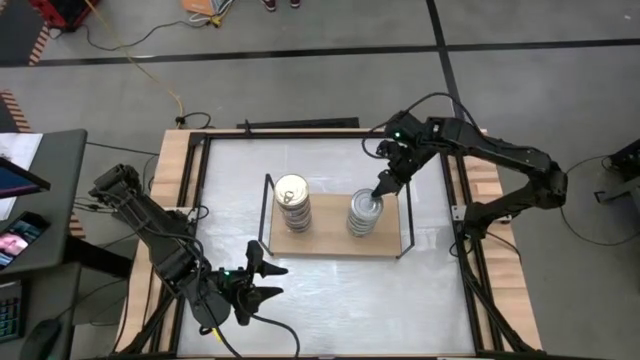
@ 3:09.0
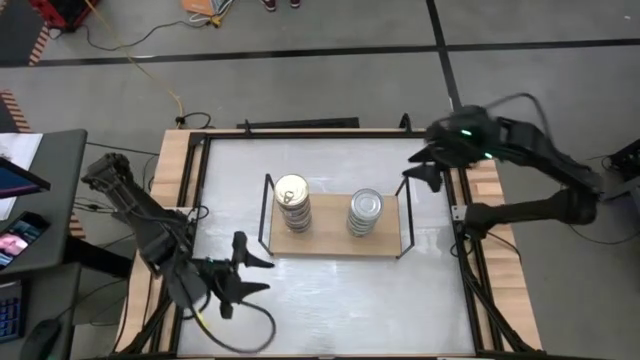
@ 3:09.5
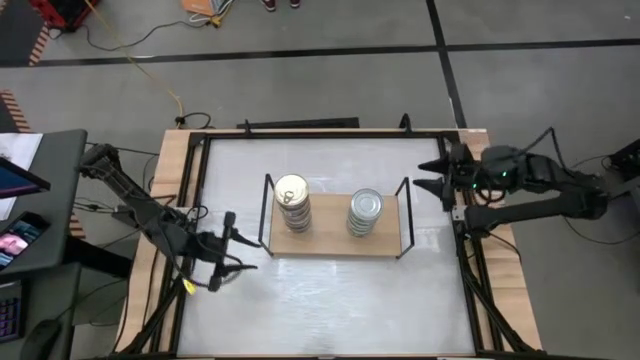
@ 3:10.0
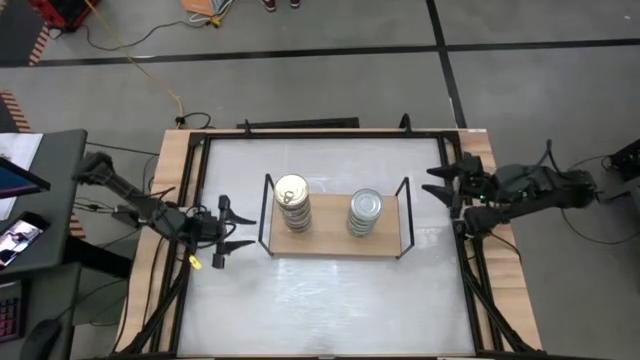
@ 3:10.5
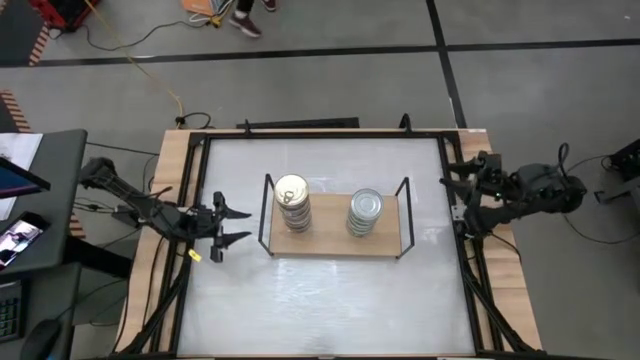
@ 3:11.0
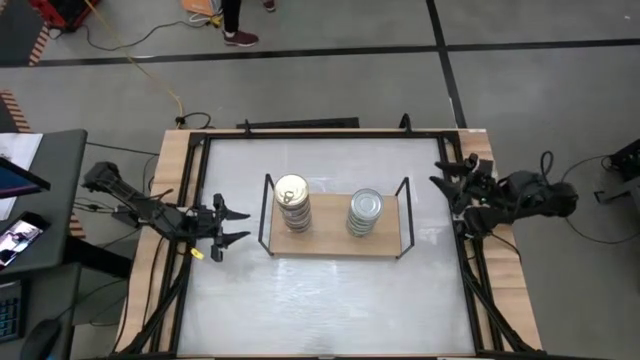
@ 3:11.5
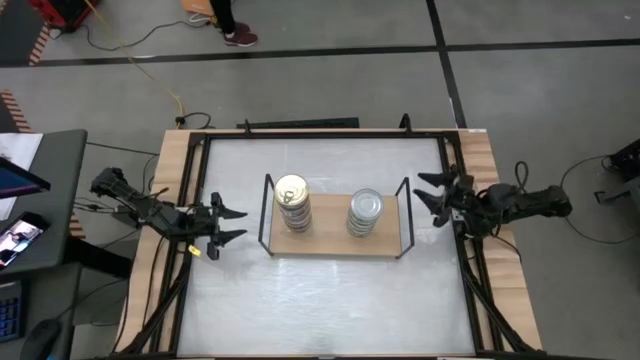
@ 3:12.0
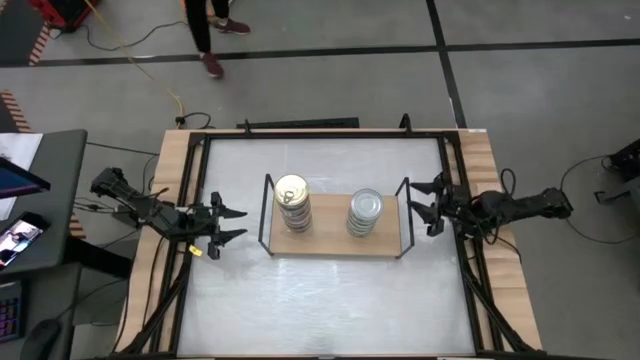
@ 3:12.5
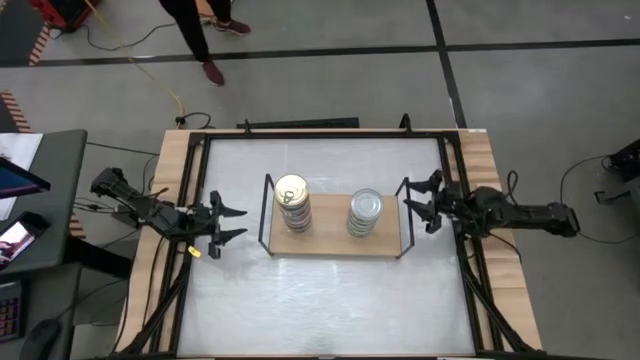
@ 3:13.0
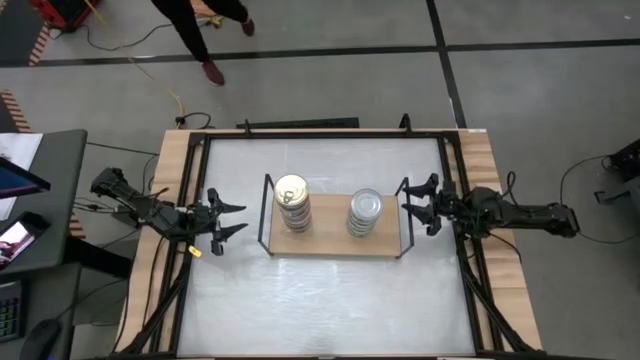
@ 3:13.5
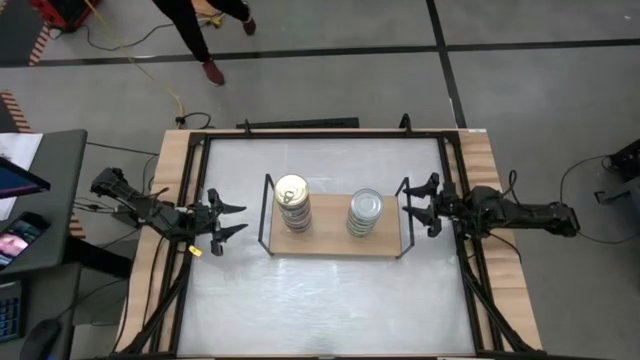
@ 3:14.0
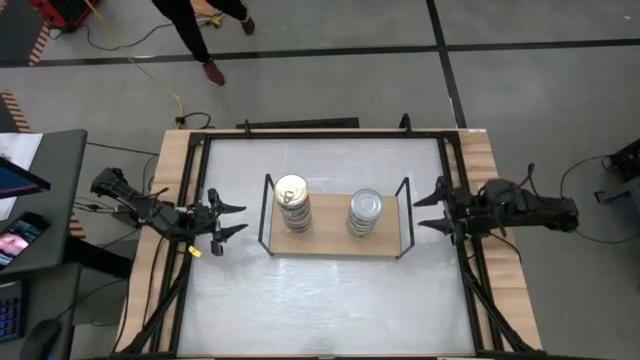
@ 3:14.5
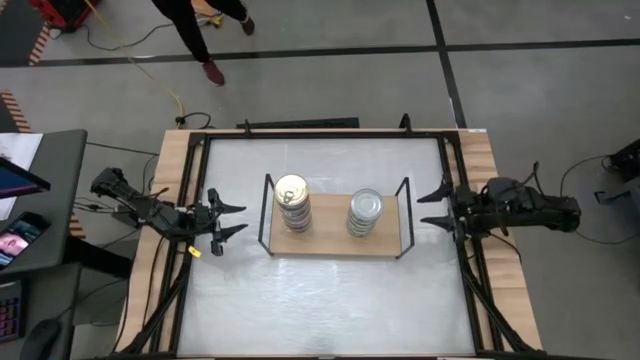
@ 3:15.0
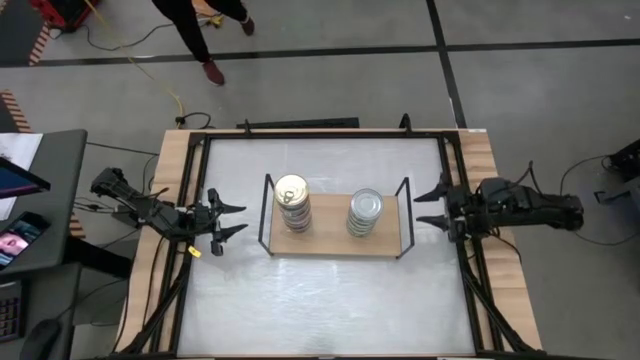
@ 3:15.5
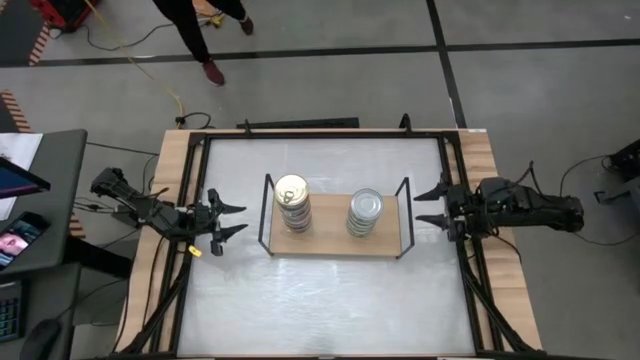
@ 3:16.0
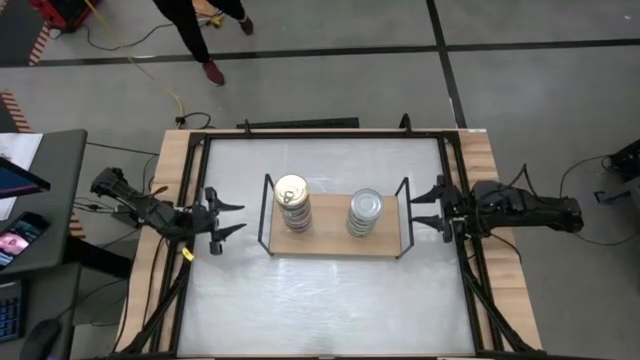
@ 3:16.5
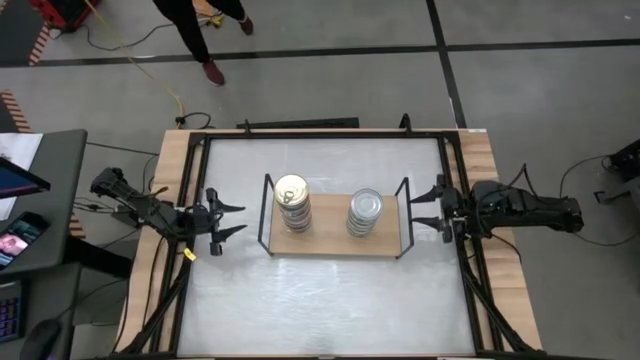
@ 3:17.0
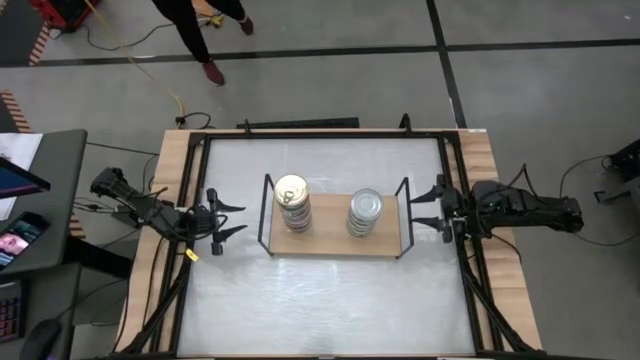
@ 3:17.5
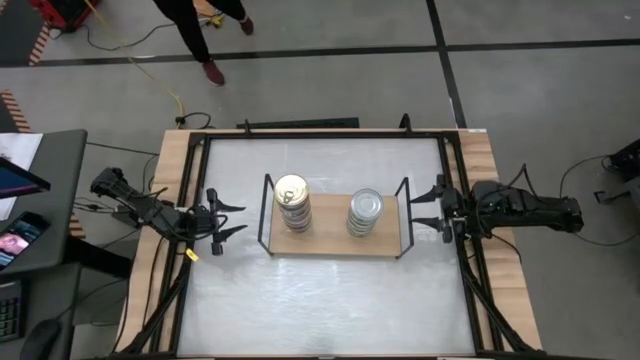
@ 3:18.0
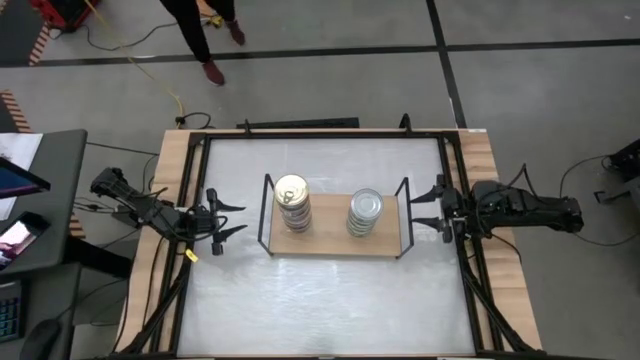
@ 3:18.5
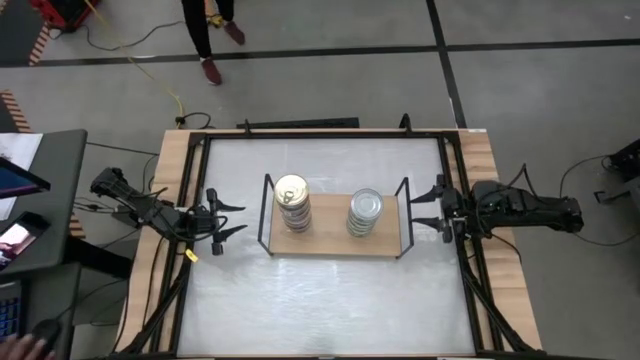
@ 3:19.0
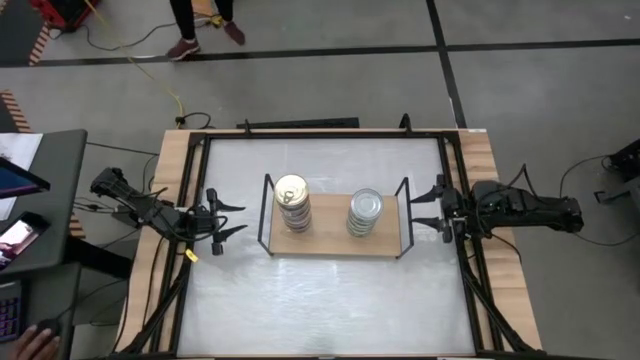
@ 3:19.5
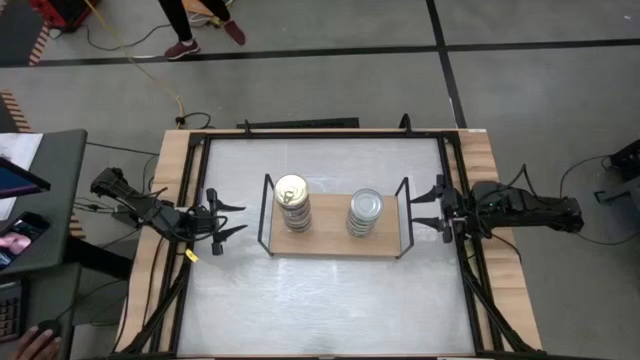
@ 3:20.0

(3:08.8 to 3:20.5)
Task: Stack canned seafood by type on shelf
Return to Home Position

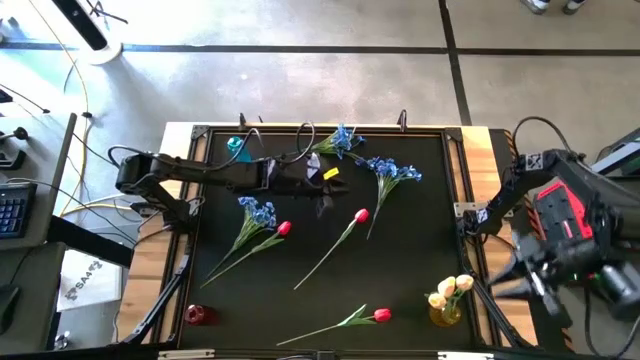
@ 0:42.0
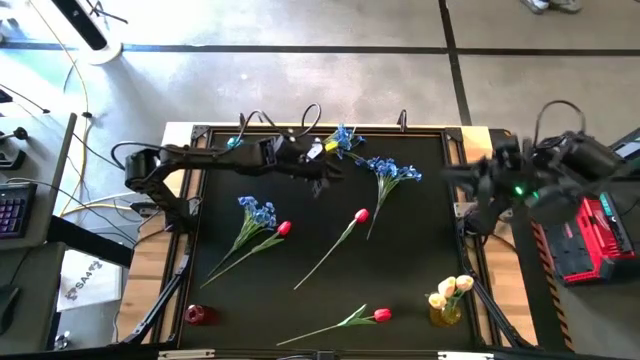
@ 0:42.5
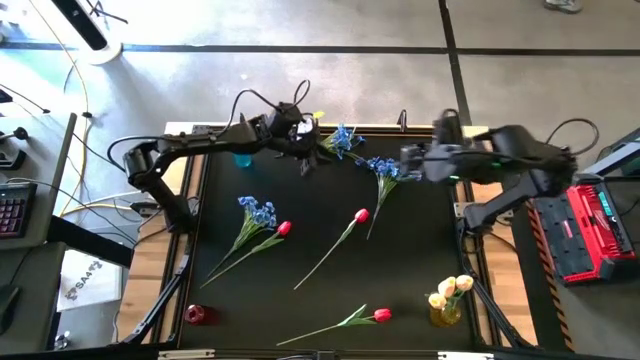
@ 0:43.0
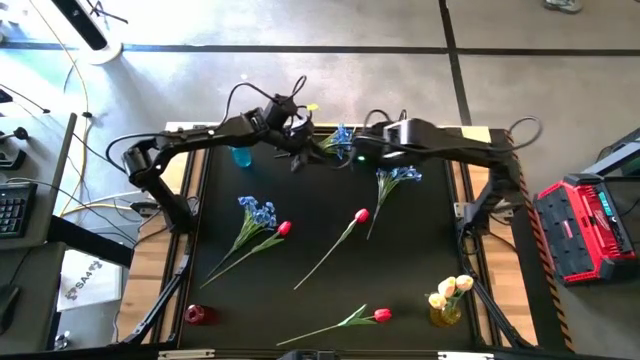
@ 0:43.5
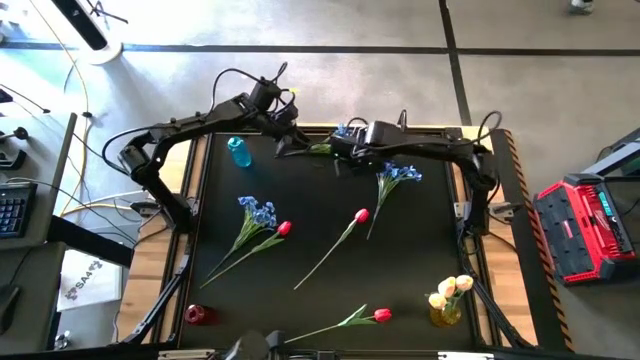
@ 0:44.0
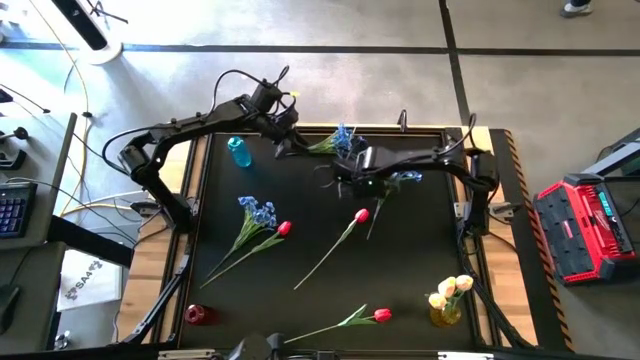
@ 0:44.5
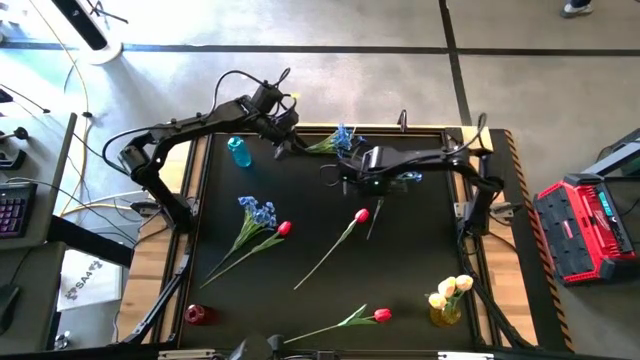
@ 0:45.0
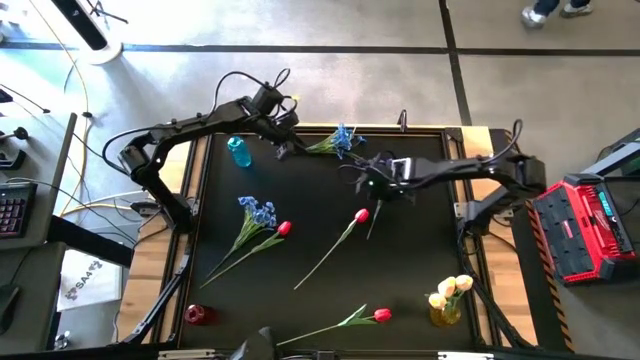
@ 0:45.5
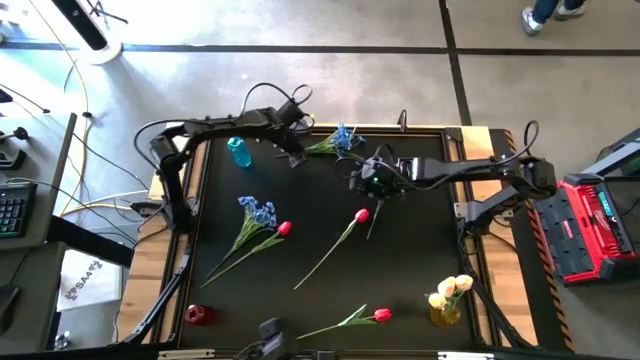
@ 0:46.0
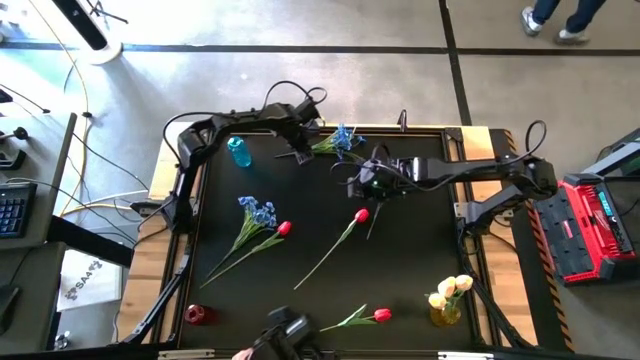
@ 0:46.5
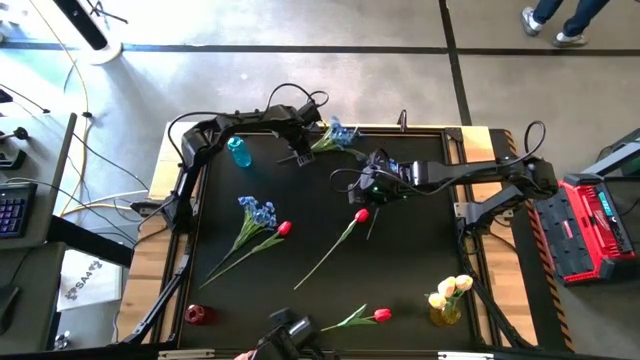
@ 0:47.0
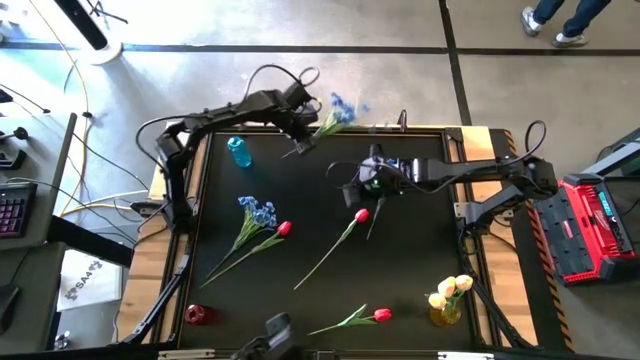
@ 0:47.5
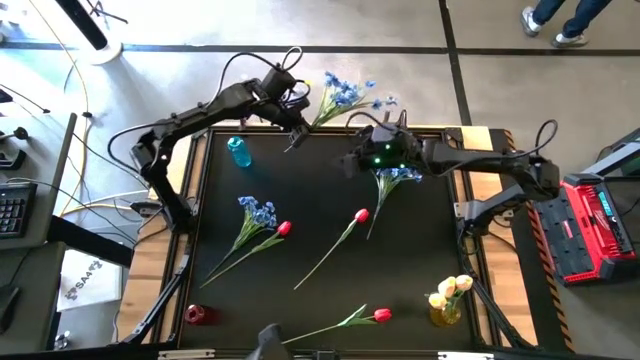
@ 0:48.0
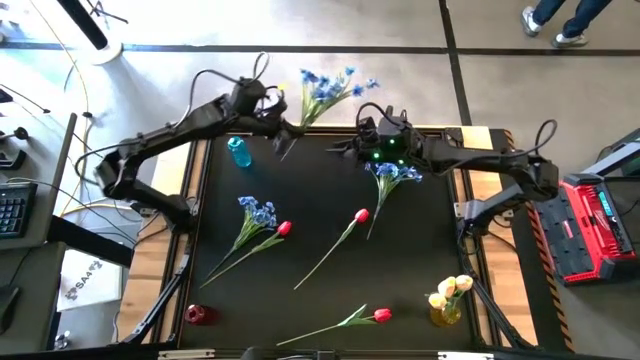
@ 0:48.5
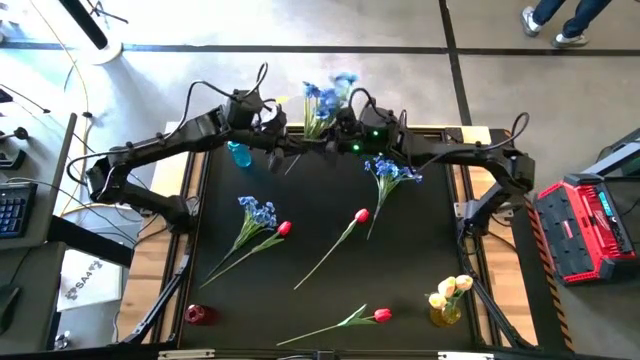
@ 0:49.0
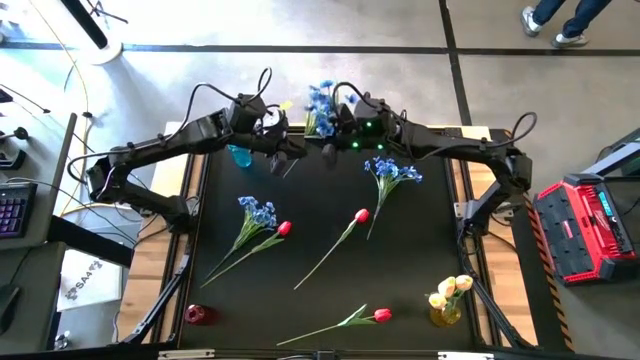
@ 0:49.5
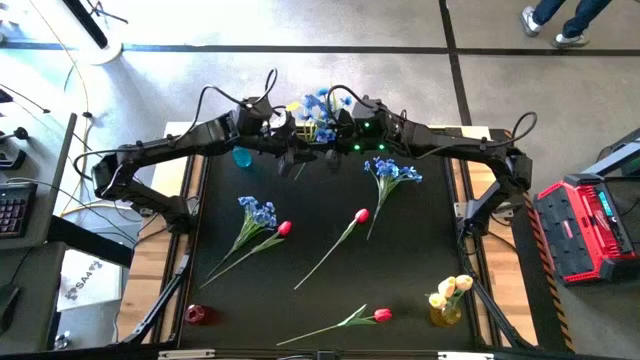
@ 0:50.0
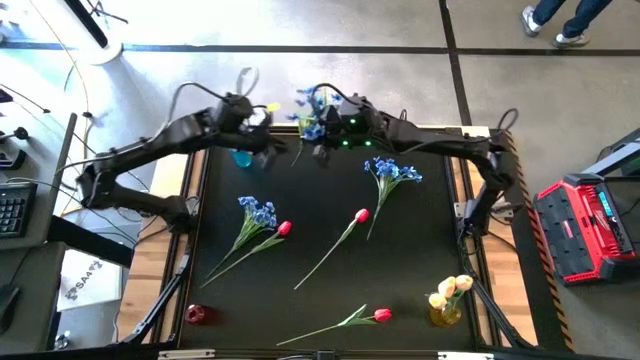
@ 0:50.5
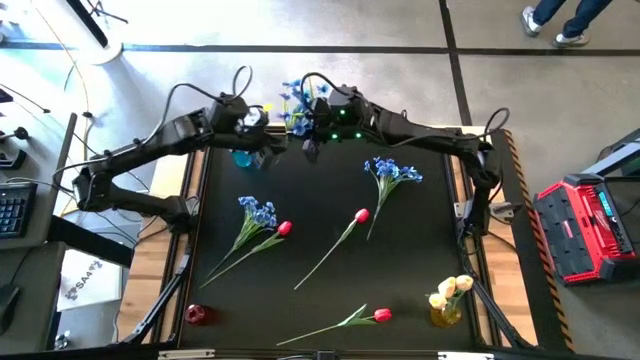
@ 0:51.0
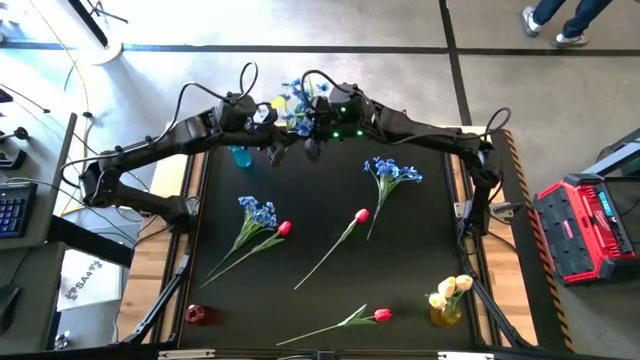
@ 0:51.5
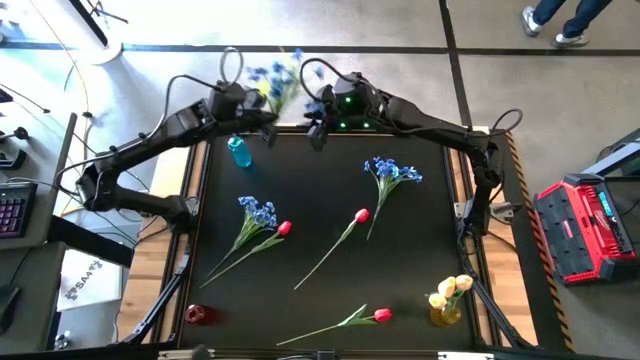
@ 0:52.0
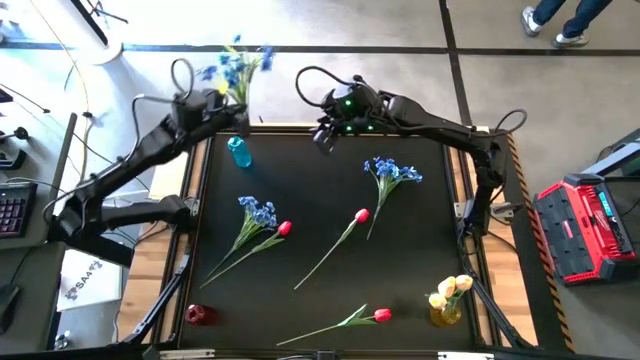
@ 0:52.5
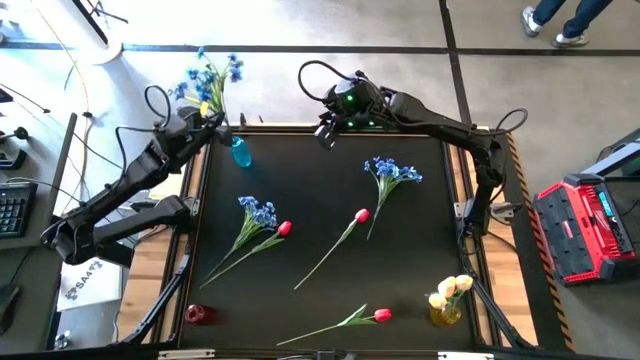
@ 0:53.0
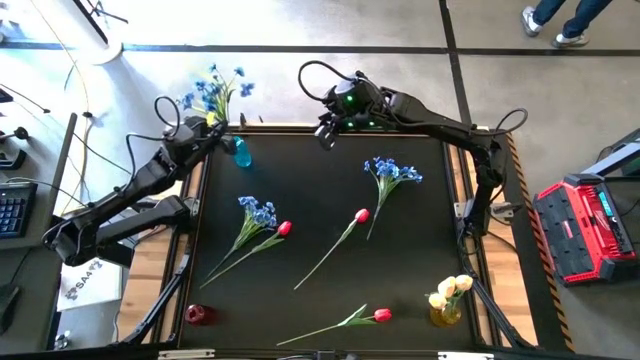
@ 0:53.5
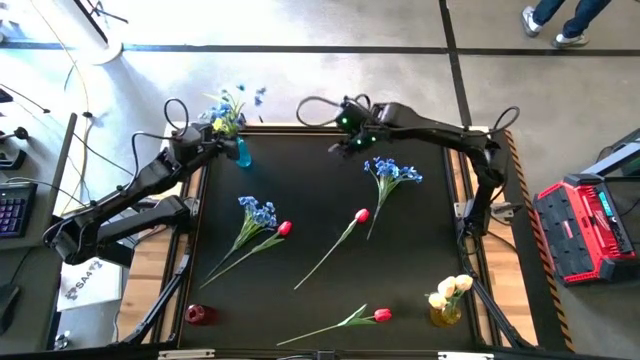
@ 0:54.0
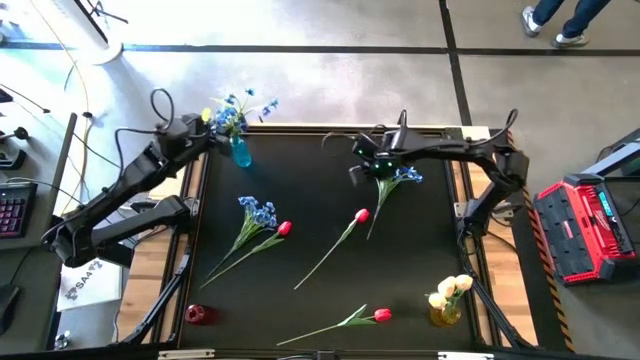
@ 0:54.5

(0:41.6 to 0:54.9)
Task: Sort flowers into vase by color
Put the top center blue flowers into the blue vase
